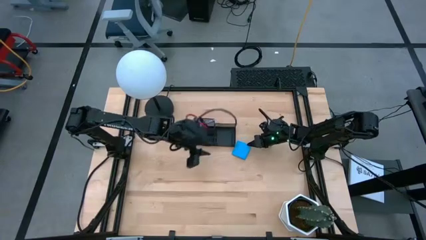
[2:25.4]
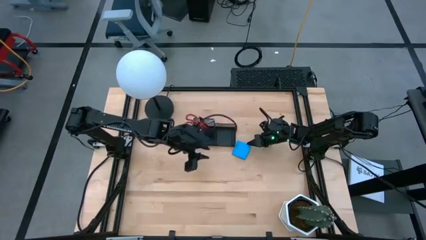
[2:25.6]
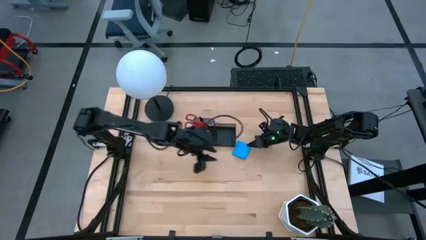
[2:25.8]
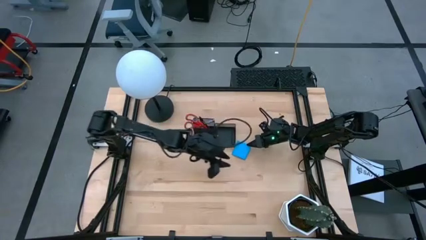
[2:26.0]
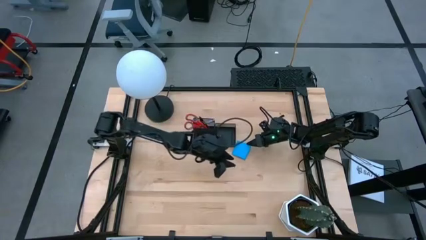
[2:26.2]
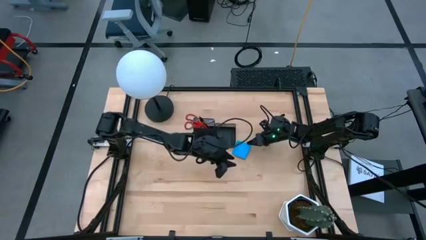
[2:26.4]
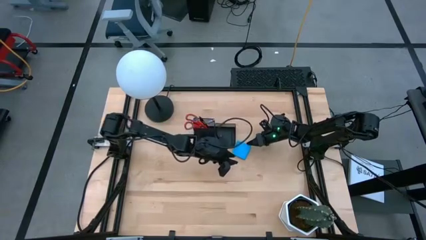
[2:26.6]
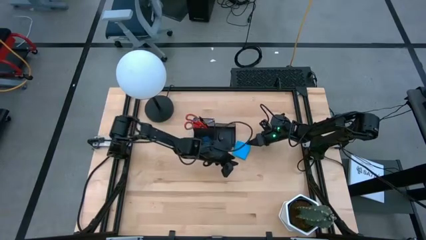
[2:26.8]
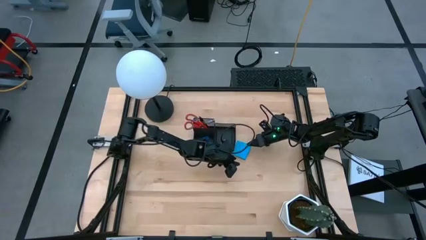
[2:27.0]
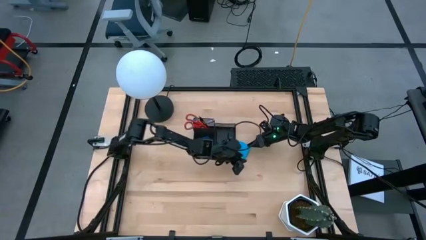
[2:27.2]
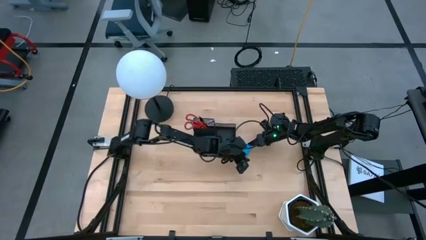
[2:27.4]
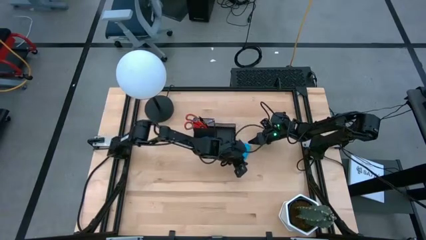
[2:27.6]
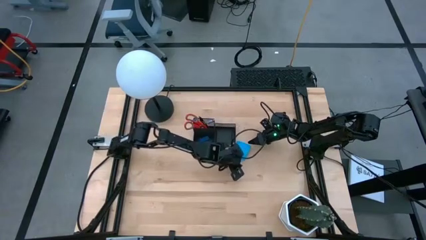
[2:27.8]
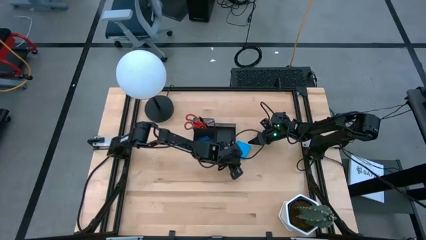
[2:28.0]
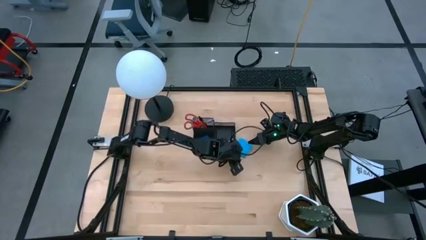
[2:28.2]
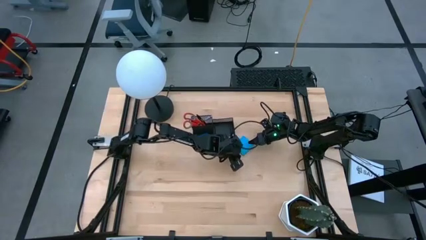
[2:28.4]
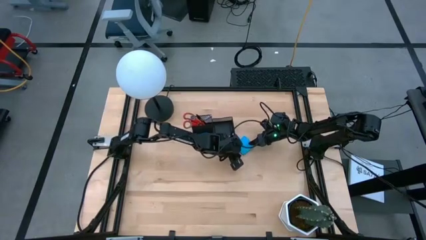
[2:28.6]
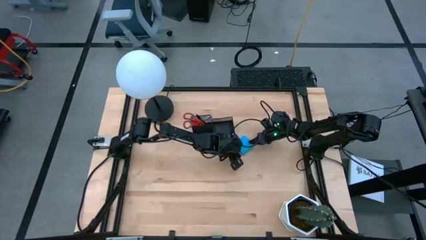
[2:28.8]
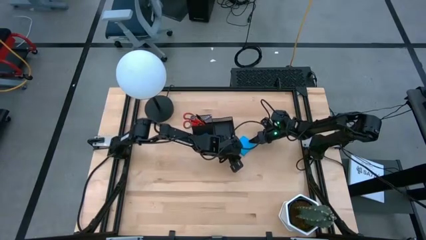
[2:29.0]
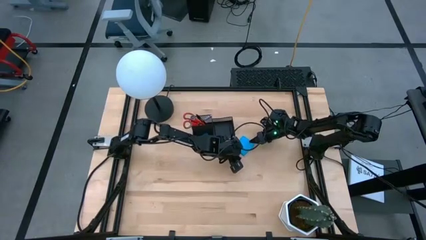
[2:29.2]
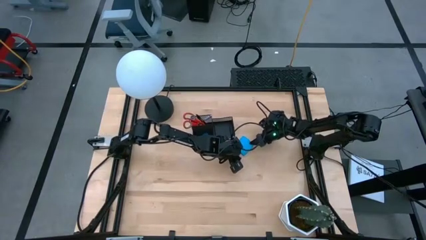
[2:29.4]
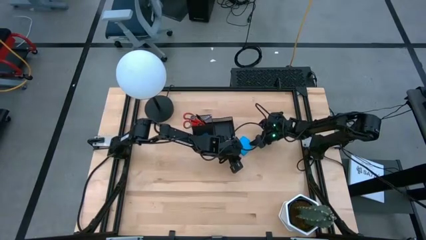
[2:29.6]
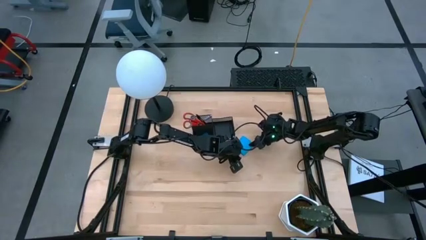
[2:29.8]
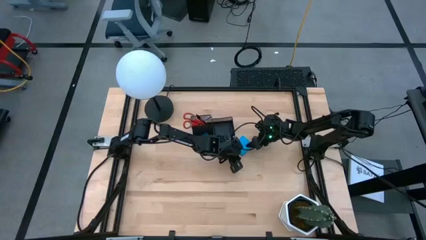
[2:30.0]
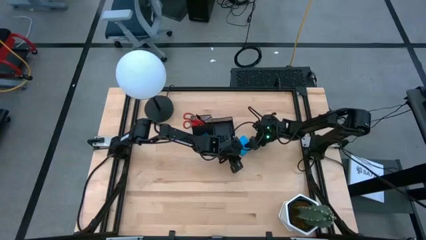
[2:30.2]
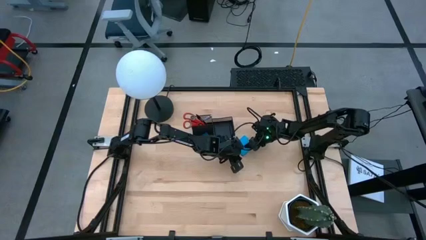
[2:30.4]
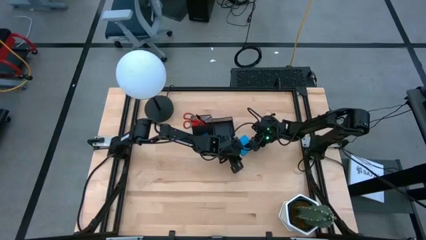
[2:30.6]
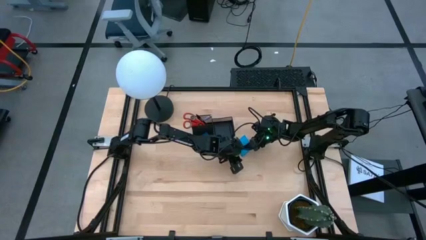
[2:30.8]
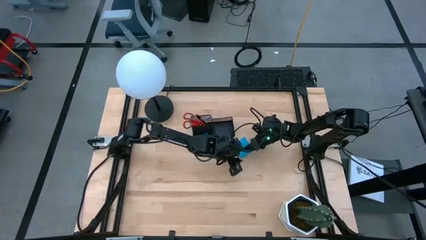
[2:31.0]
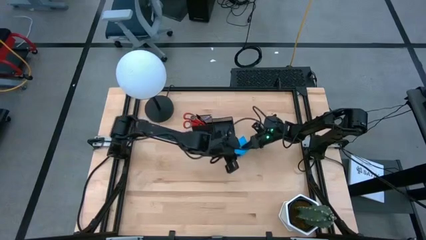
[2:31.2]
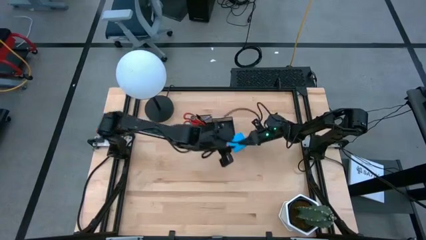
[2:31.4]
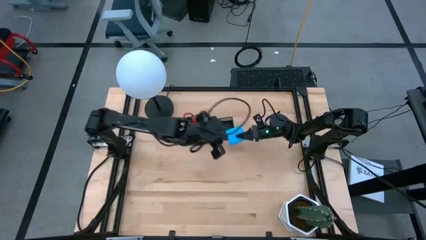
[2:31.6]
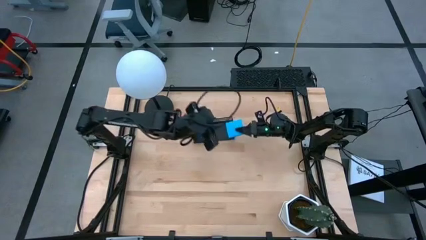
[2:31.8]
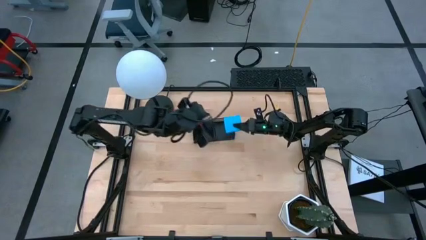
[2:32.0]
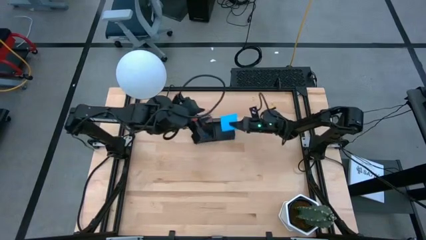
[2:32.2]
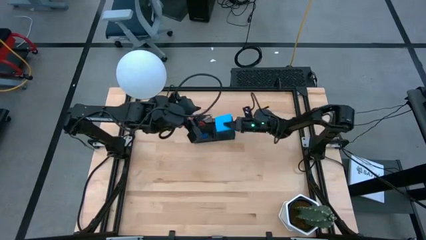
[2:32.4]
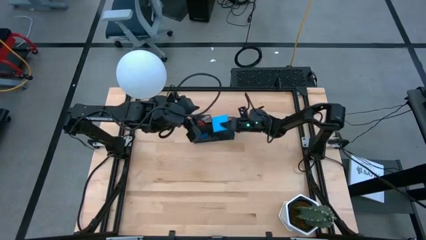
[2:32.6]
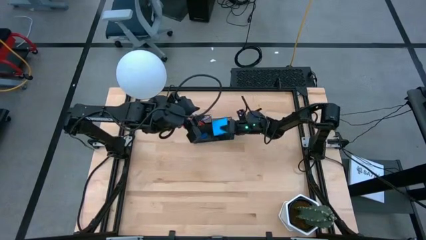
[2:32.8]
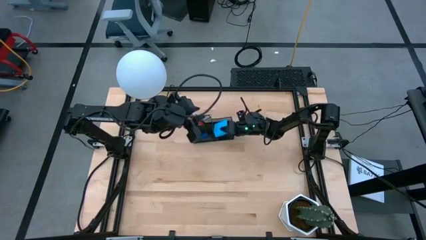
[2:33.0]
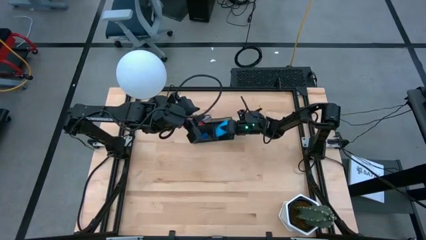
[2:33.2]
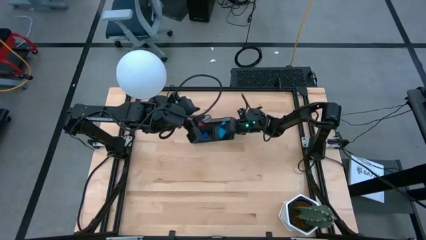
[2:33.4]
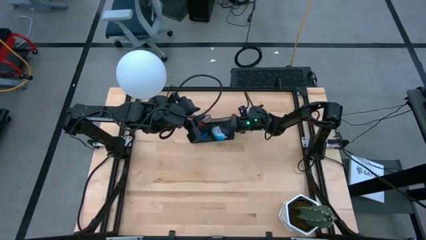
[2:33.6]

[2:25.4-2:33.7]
Task: Pick and place office supplies into organizer
Put the blue sticky note into the black desk organizer

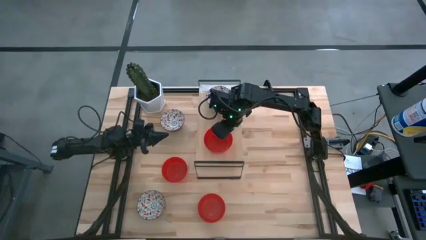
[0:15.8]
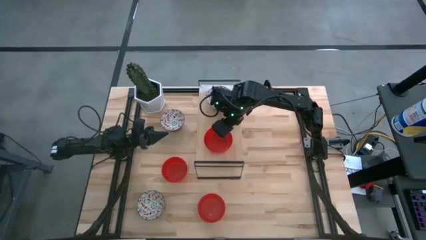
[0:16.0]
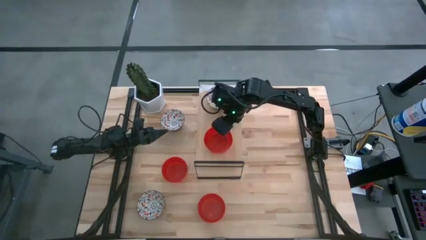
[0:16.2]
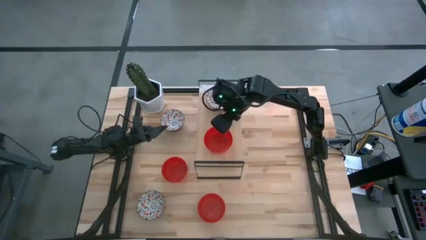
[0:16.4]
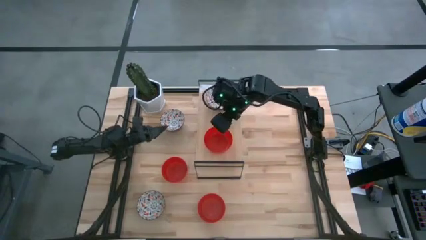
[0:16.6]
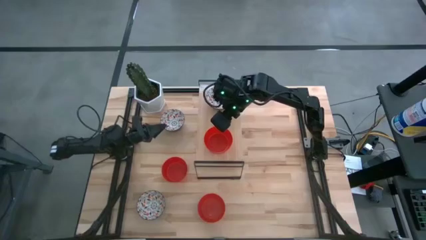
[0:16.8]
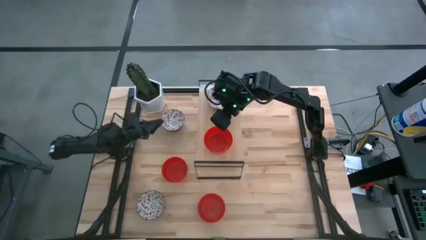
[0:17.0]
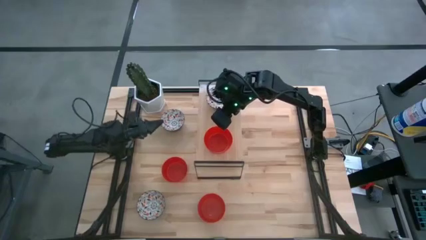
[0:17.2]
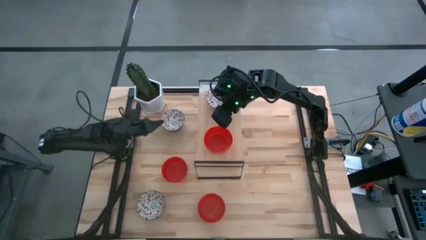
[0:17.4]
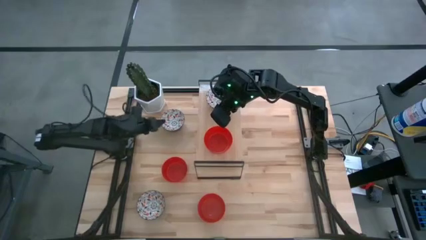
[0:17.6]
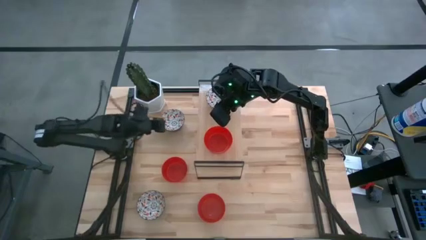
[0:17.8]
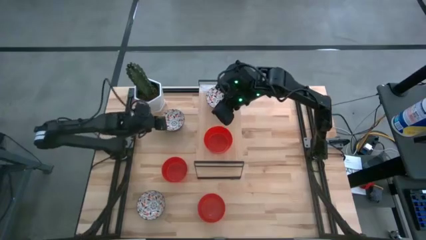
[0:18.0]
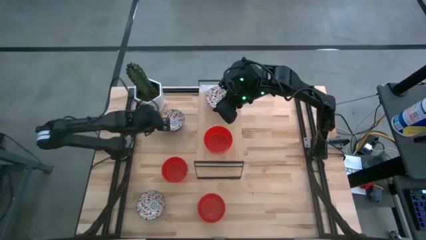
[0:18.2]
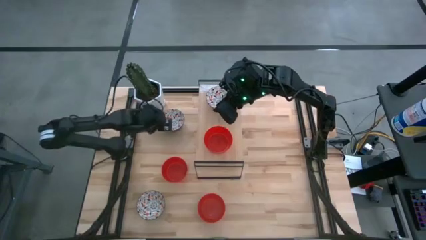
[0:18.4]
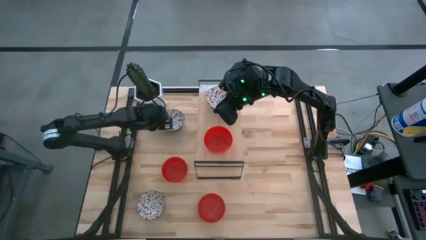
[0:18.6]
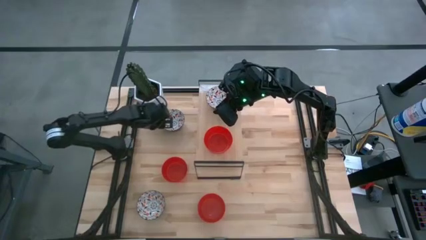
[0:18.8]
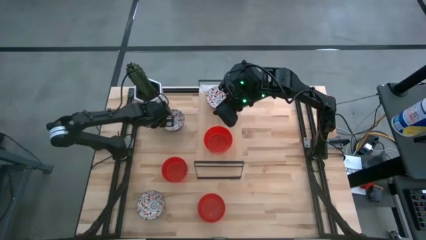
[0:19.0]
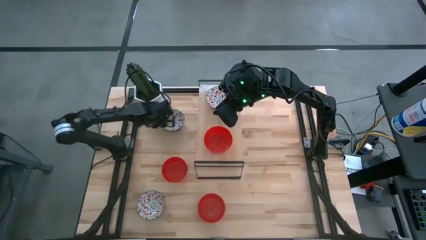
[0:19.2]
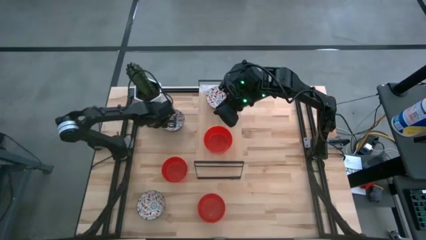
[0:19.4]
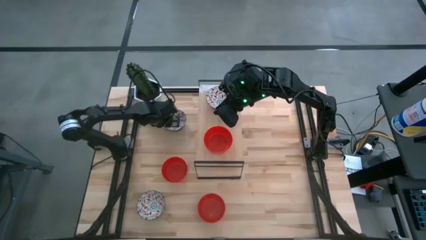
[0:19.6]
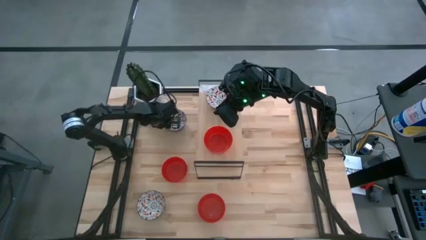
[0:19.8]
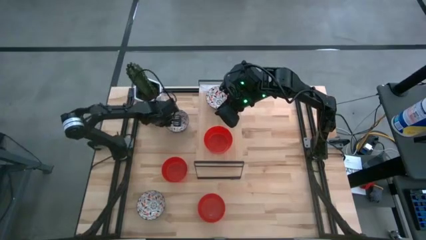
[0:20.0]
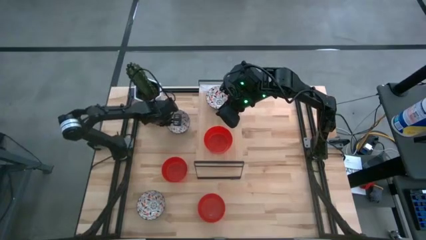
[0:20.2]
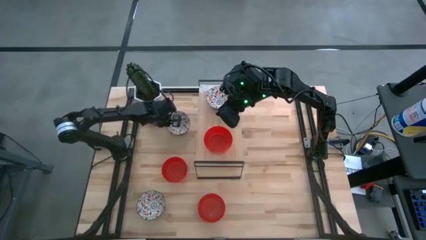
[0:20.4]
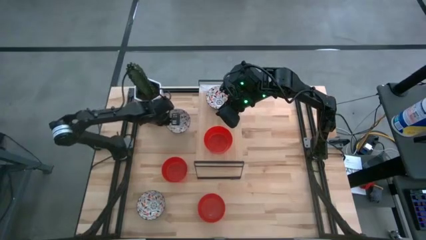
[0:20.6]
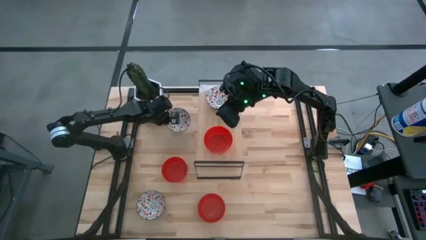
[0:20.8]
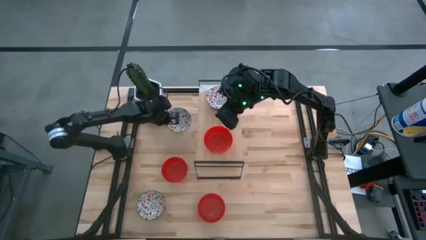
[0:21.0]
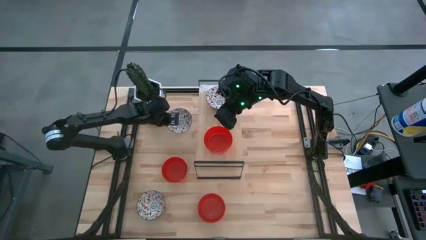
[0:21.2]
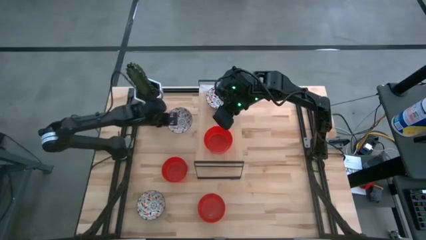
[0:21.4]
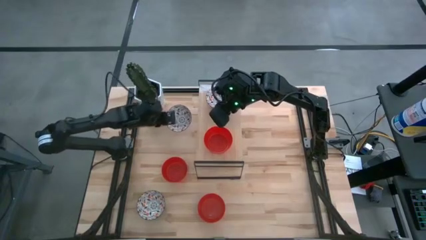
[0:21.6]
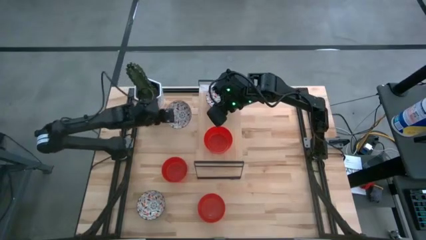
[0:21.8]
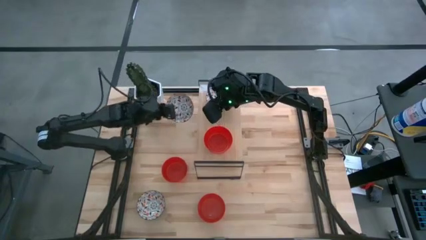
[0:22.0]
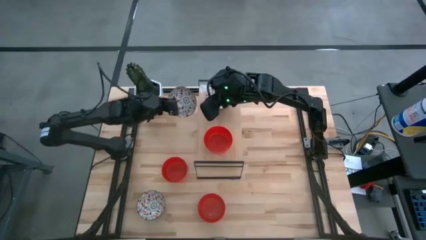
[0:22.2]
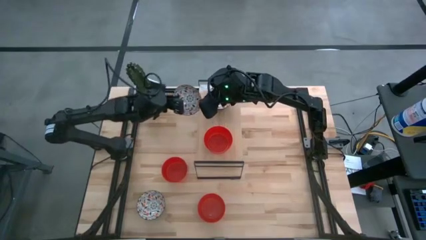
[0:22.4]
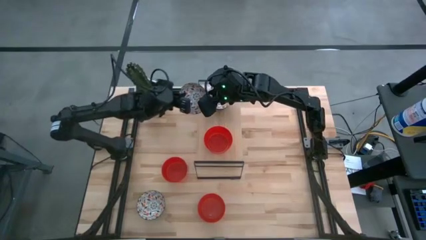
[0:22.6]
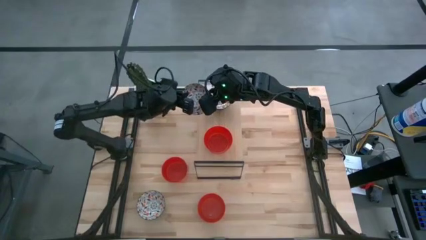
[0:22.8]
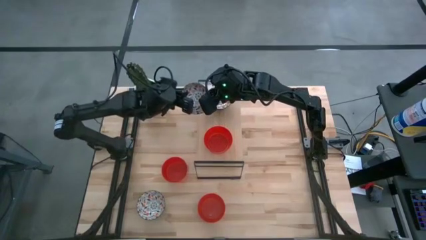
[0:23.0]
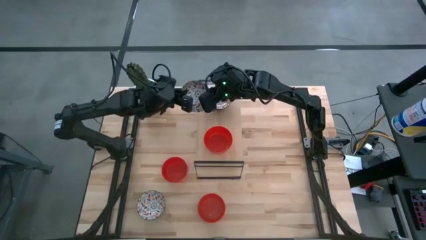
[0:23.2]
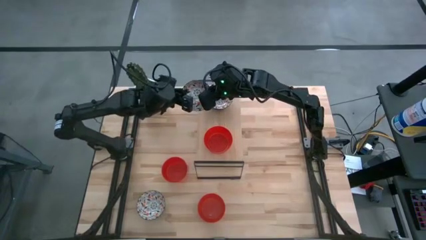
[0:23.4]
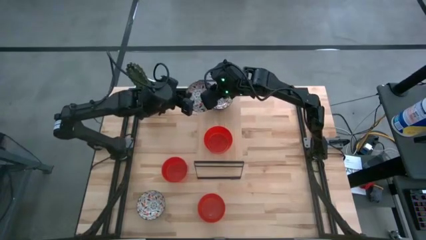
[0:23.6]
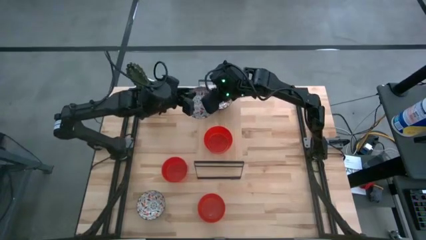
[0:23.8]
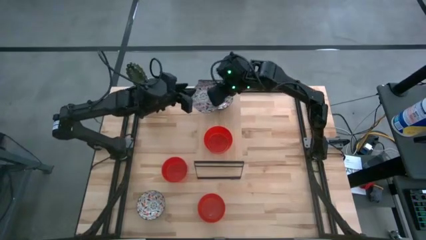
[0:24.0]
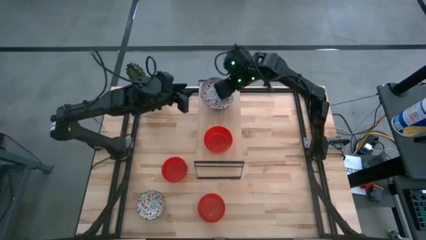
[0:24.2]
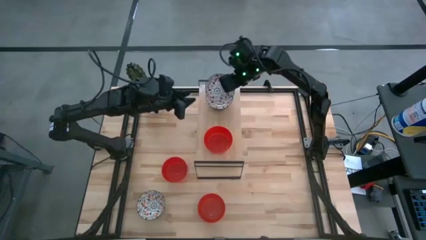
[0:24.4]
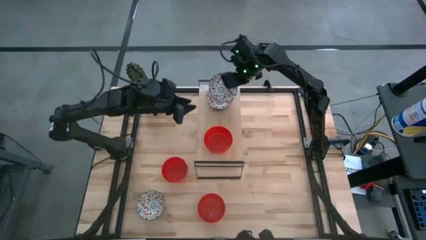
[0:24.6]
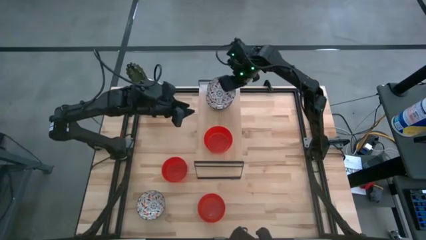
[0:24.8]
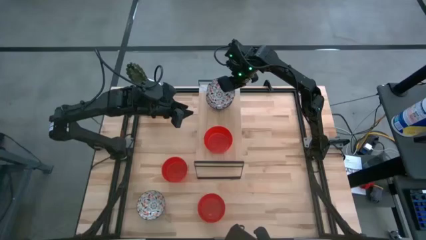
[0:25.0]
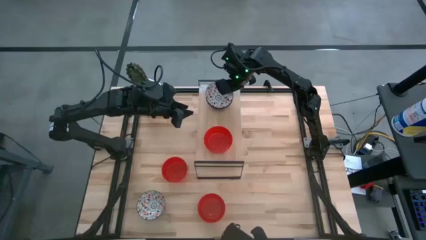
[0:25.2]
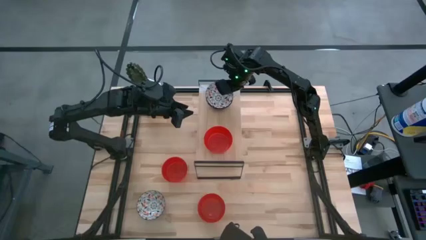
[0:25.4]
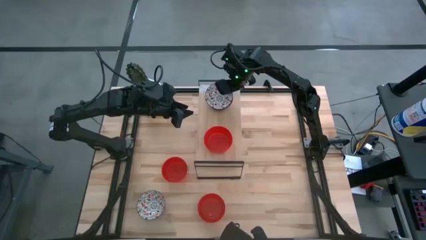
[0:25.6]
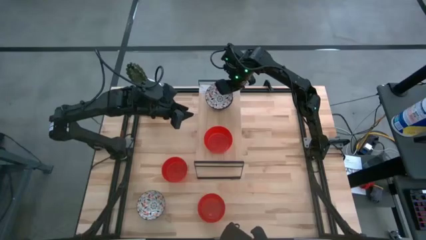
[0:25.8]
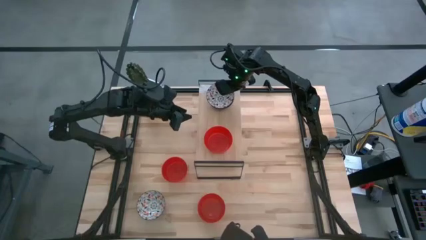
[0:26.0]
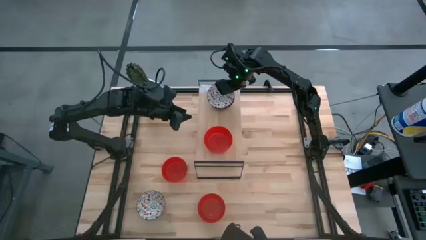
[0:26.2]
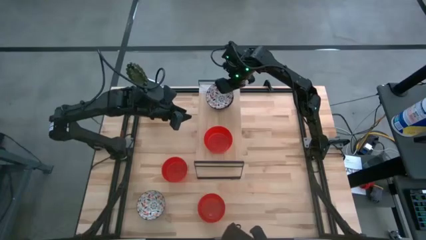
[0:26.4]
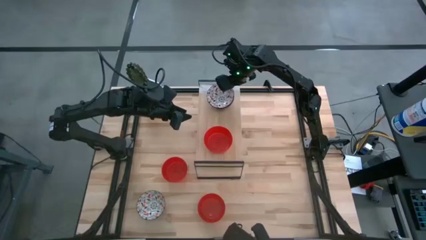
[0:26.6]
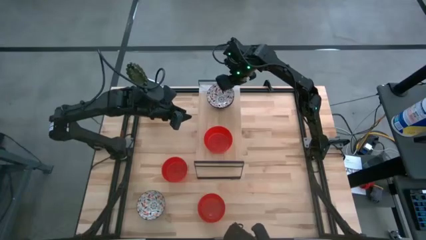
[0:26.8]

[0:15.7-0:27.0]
Task: Pick & Place Mini bowls
Stack the top white patterned bowl on top of the other white patterned bowl on the shelf
